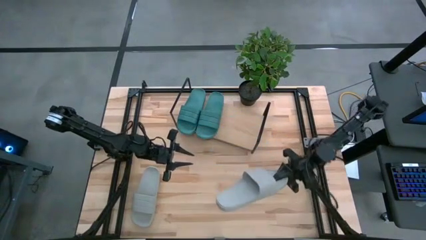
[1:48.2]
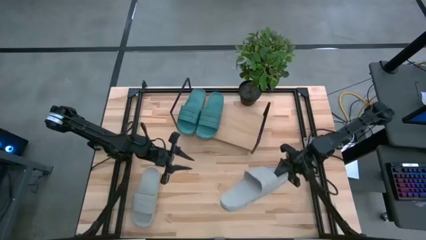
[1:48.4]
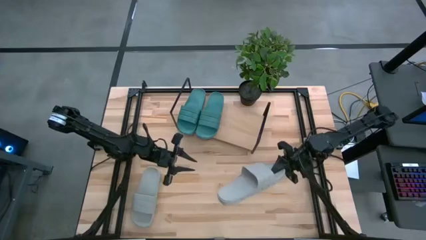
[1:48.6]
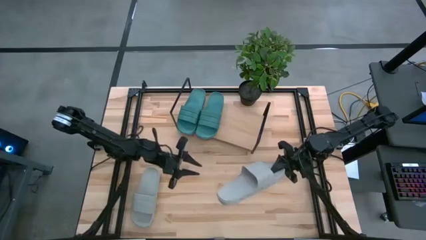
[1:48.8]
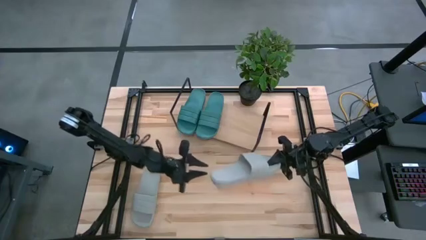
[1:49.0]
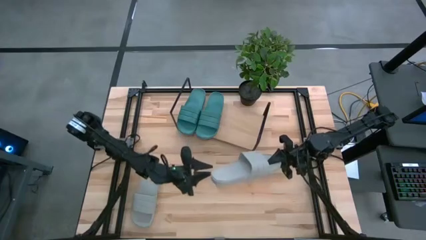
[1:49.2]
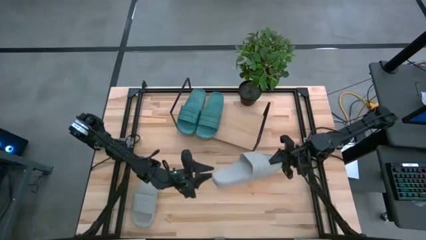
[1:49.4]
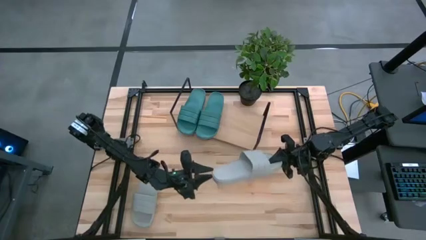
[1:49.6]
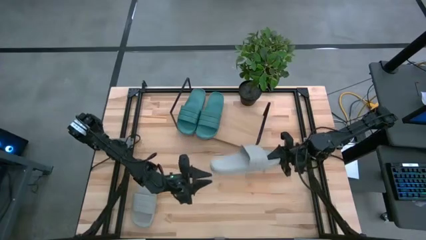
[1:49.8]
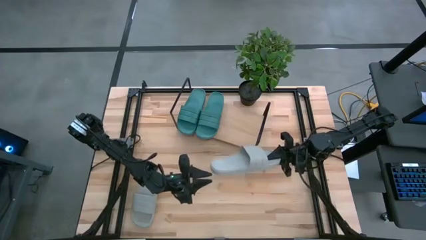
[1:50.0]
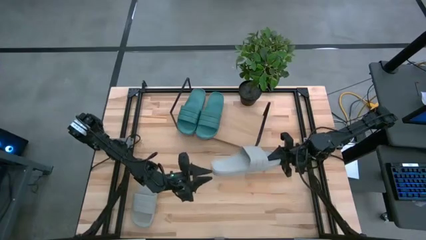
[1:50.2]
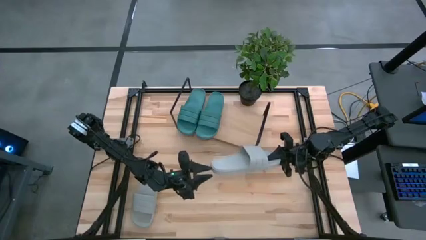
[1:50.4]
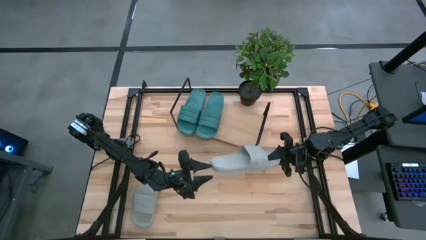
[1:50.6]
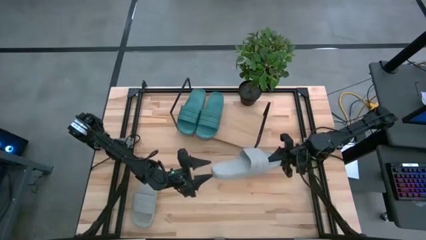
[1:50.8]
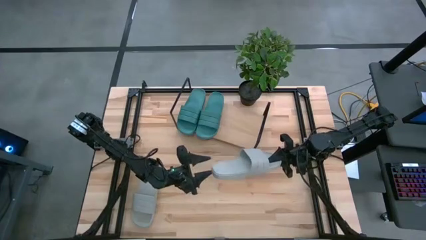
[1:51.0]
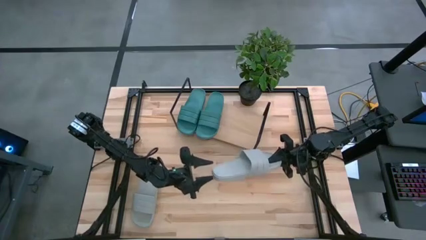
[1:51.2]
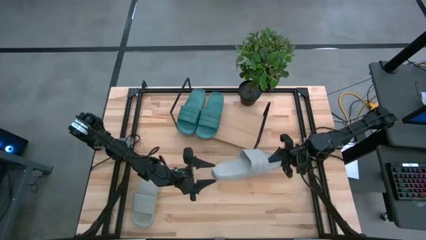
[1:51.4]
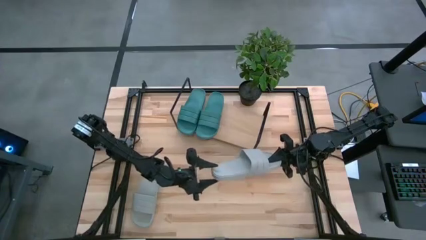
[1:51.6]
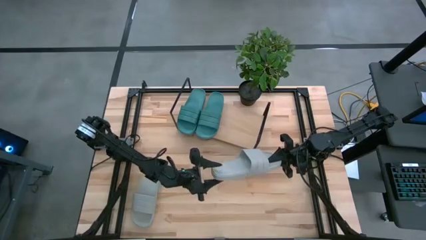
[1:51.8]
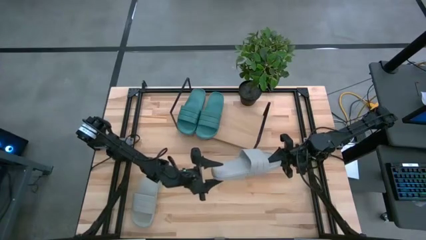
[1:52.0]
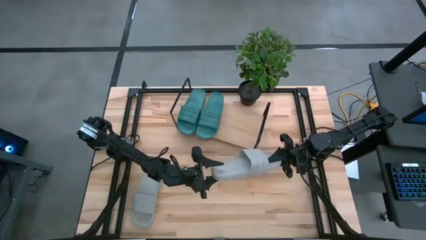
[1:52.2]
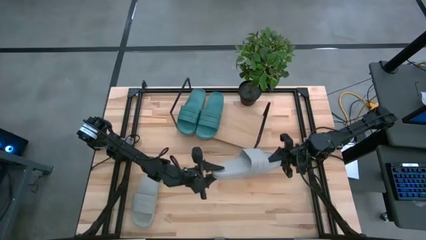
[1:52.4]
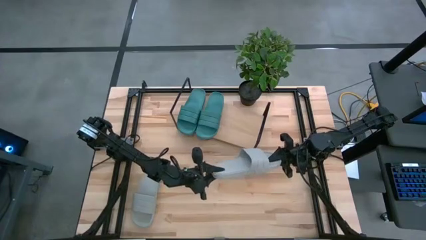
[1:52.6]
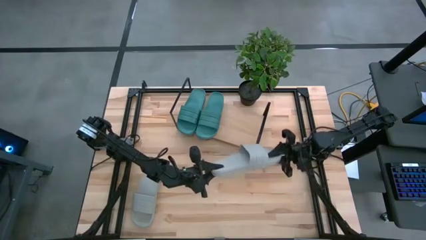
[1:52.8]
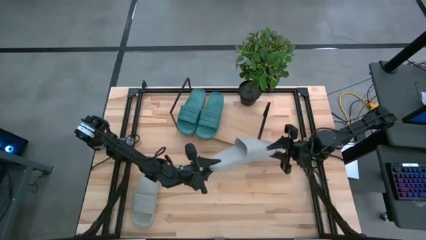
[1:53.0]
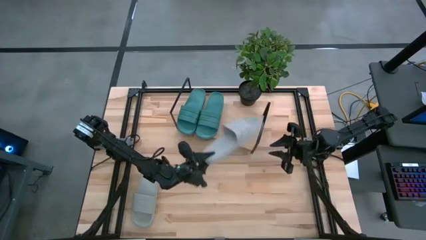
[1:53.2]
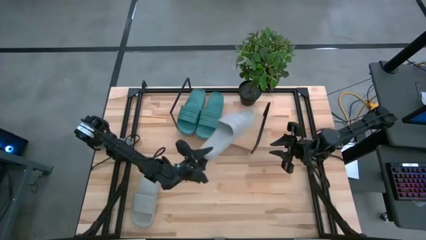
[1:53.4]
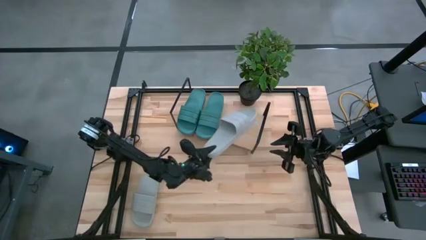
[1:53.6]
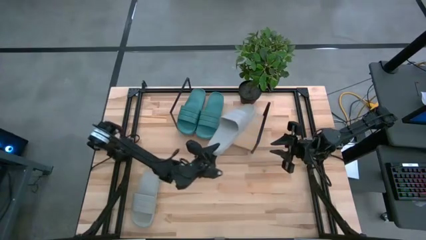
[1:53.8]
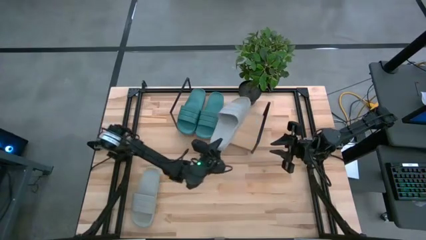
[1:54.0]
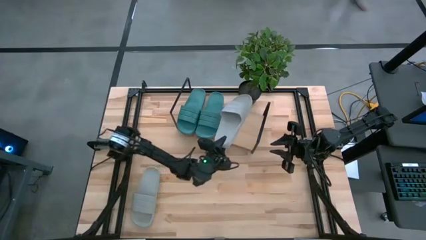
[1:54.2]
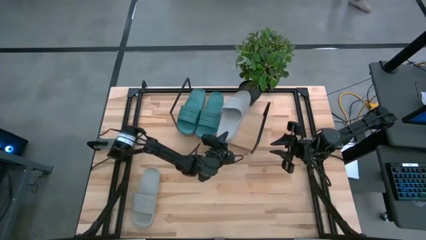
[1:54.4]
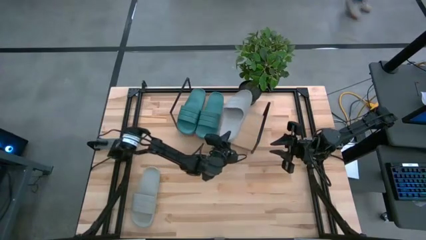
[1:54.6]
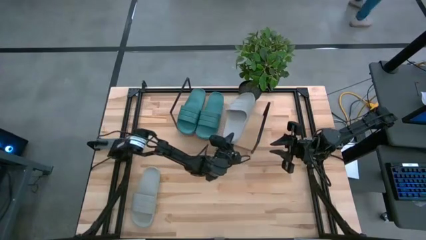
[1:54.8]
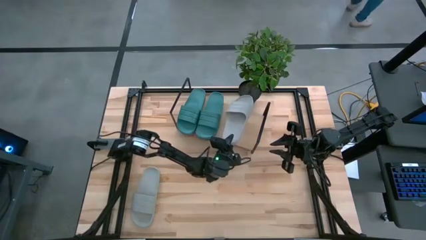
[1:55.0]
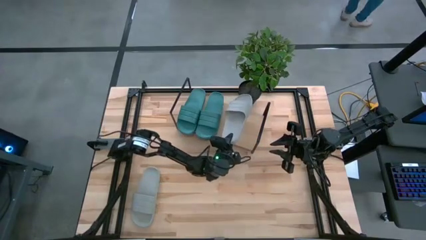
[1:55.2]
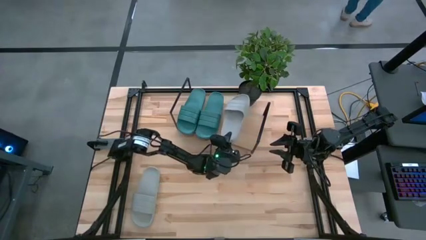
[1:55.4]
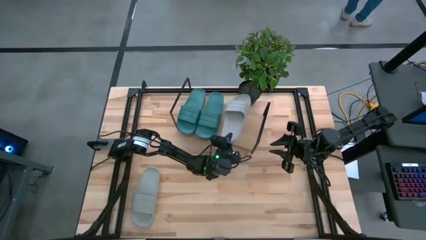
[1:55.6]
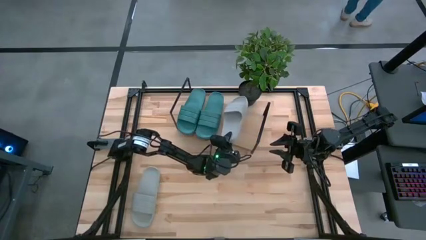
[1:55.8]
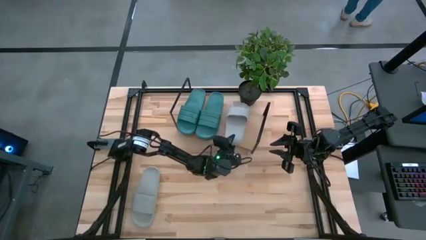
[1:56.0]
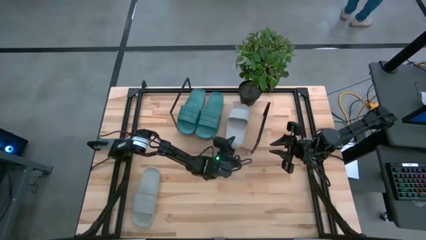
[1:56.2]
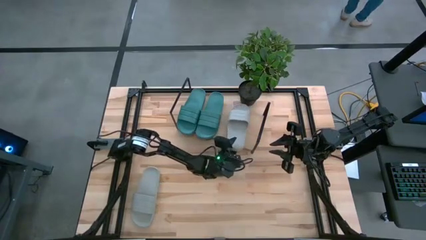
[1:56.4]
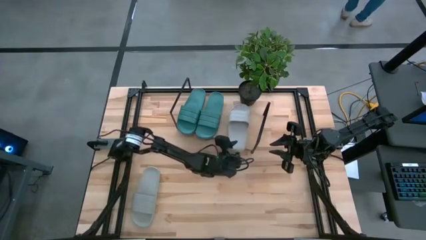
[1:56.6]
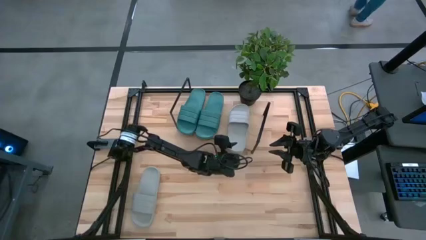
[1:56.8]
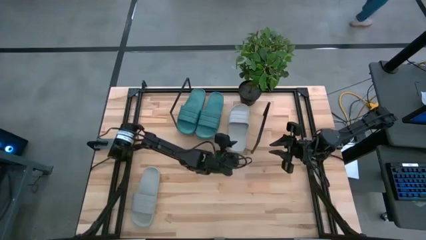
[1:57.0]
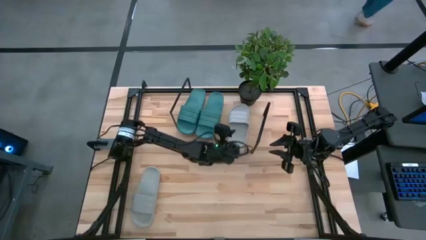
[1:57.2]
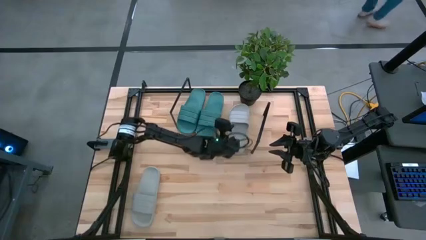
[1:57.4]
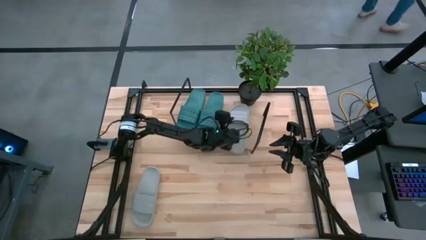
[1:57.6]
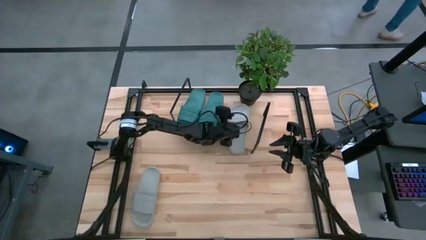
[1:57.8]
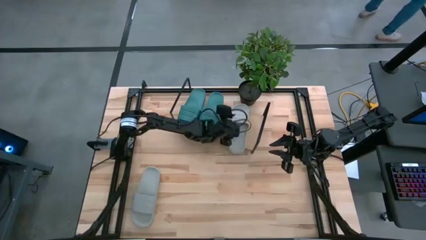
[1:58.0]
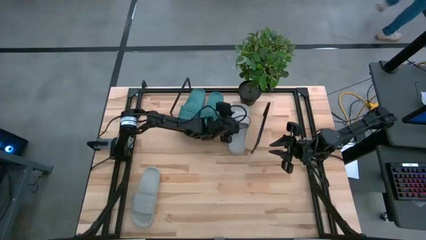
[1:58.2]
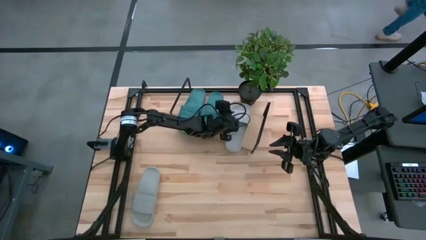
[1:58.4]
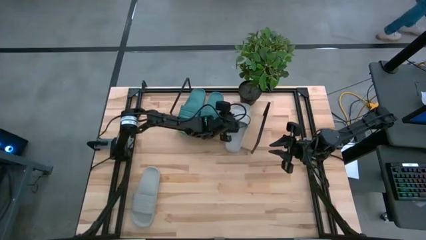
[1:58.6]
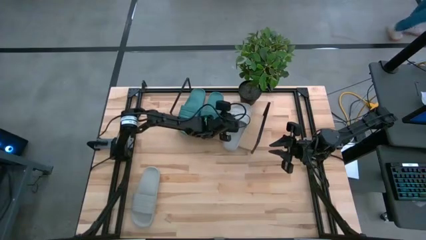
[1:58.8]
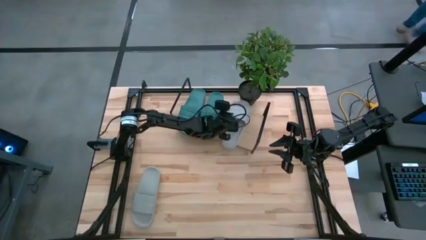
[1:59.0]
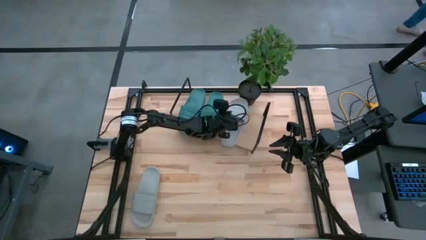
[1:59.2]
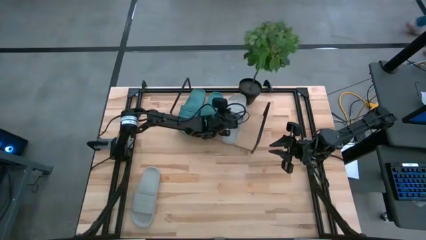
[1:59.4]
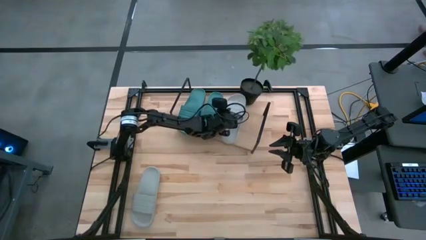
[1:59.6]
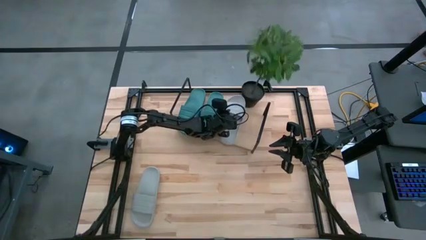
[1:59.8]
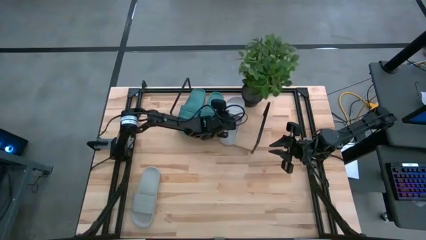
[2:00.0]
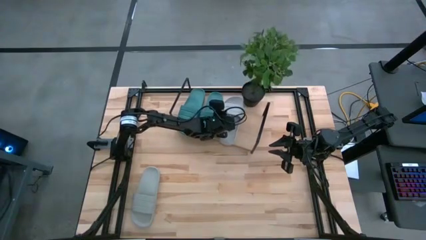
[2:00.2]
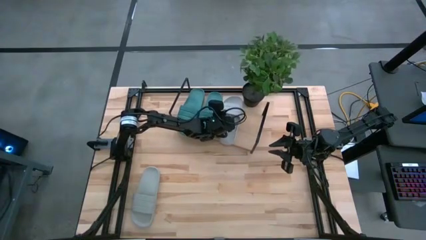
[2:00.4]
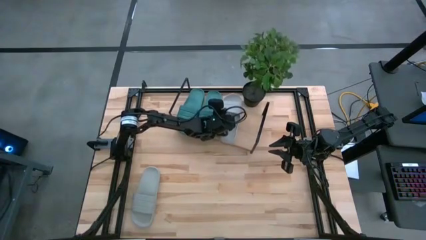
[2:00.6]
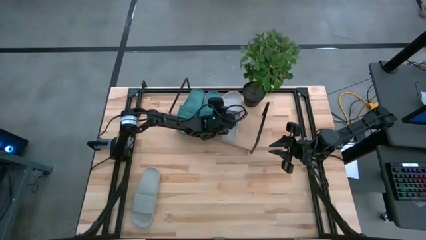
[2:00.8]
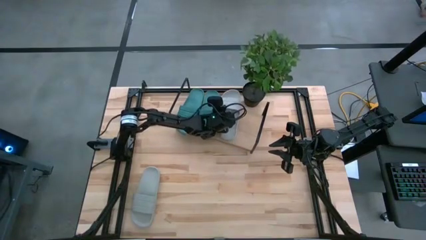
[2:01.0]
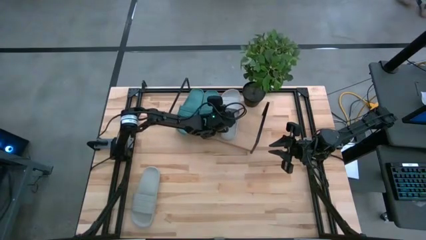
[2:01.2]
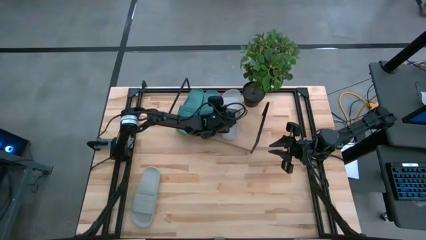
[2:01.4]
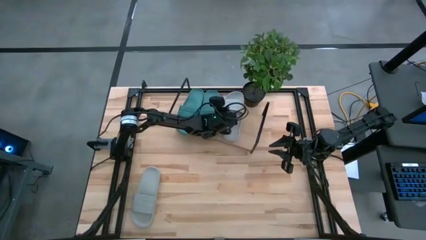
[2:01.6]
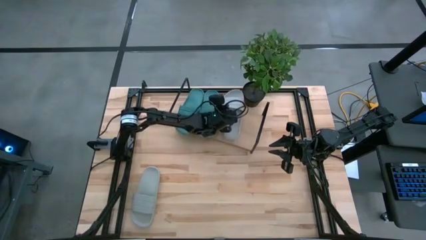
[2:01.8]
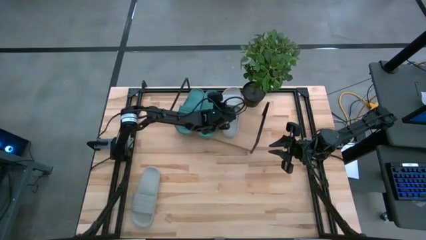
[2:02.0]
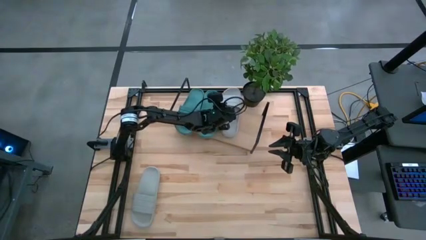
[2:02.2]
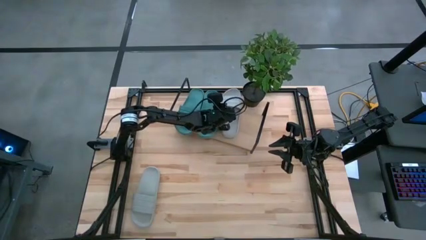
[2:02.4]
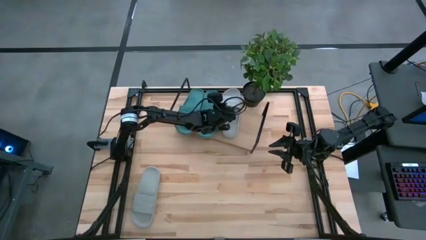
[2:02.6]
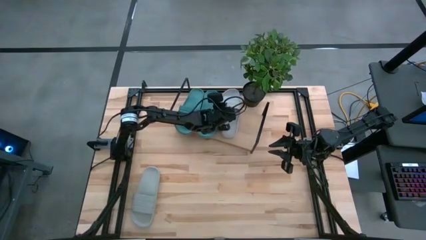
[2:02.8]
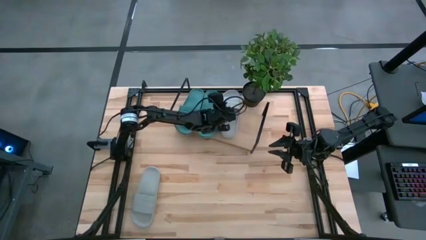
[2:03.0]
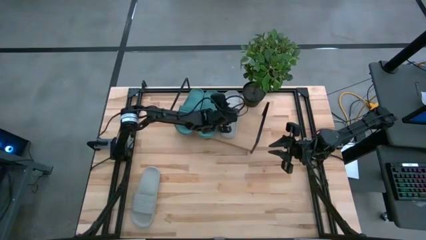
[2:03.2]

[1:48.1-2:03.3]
Task: Pick and place slides into the shelf
Put the top gray slipper on the shelf
